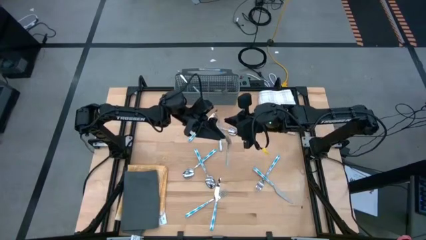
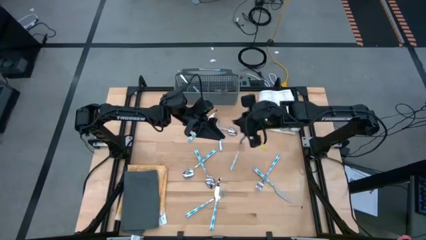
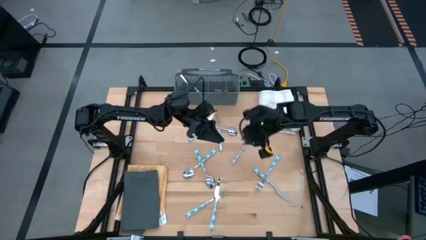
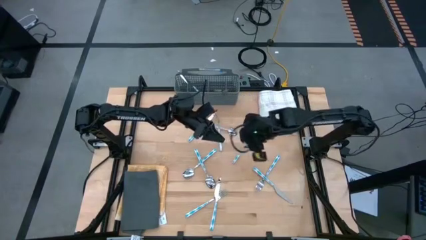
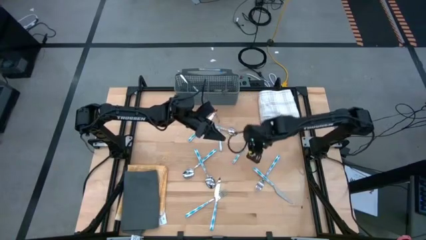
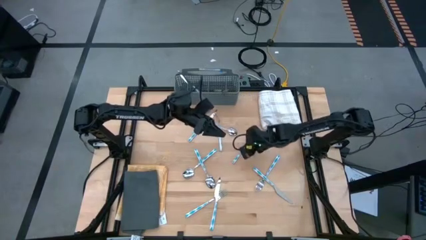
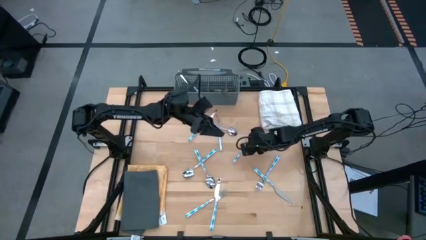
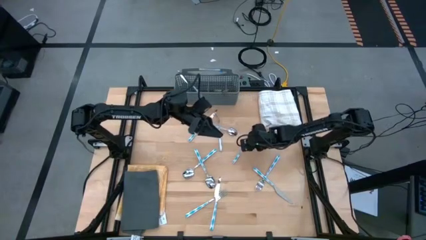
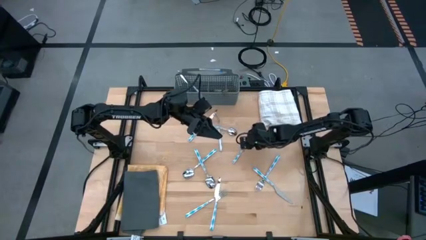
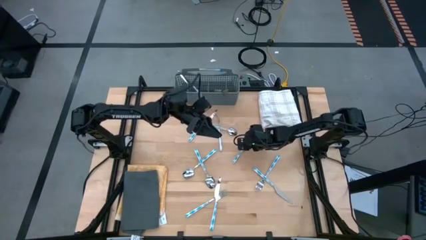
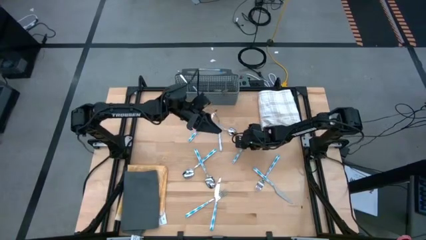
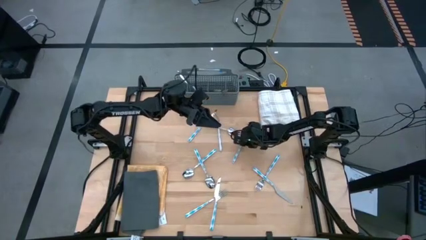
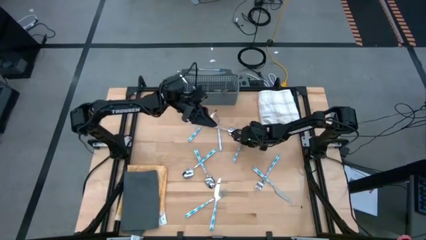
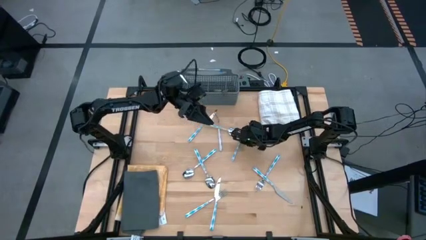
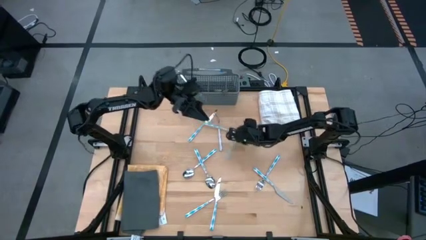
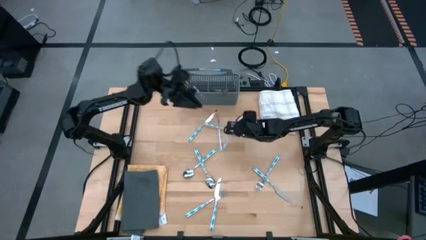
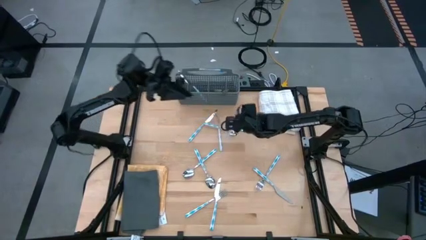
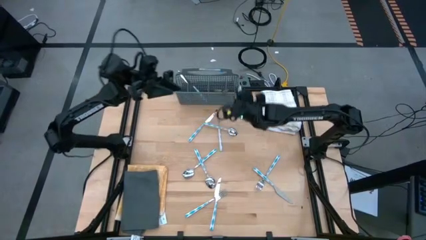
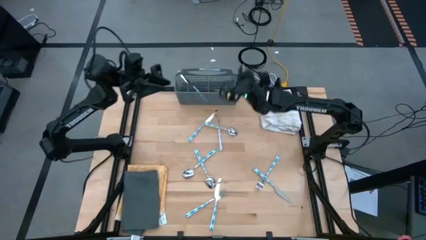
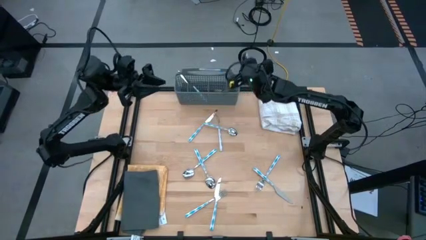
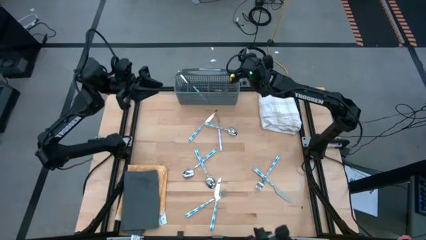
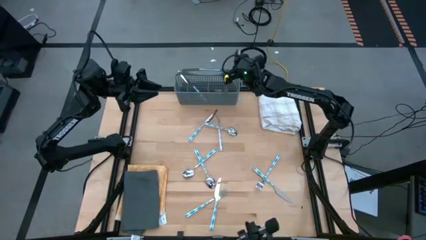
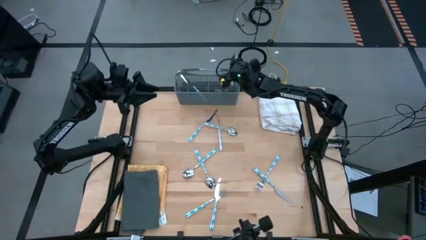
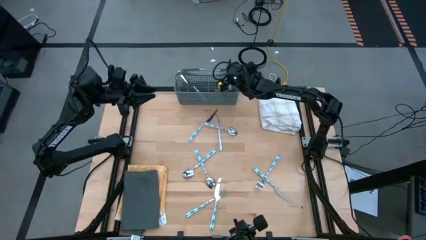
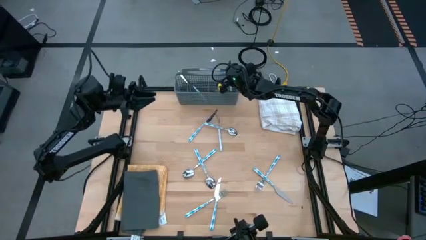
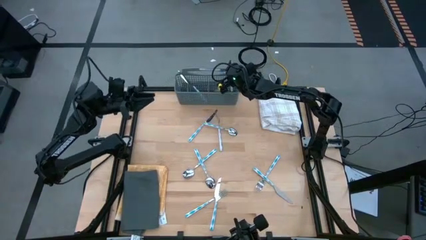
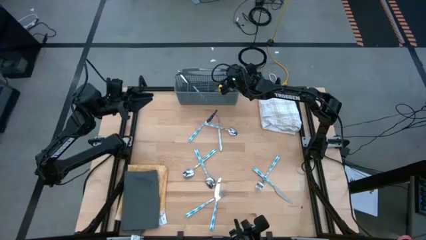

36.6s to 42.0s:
Task: Sort silverware
Put the blue spoon into the gray silverware rack

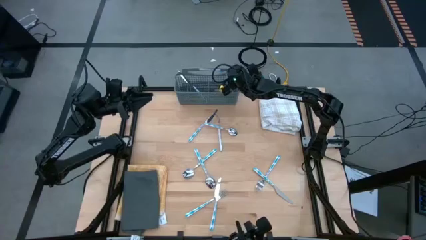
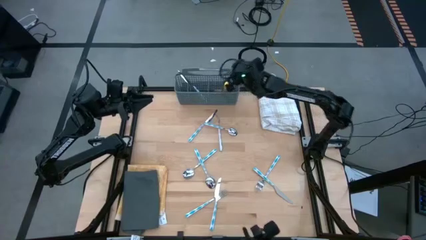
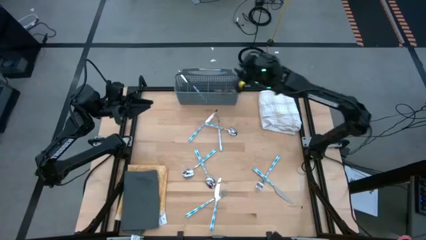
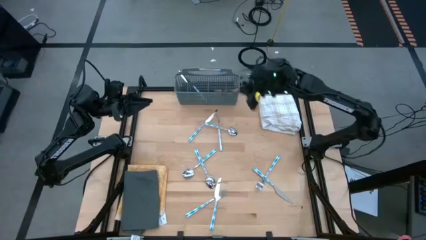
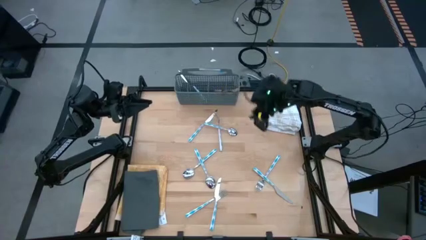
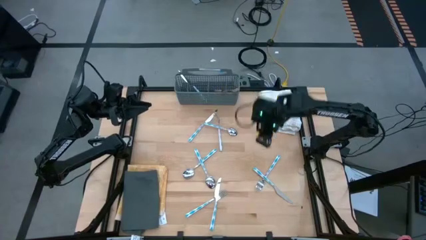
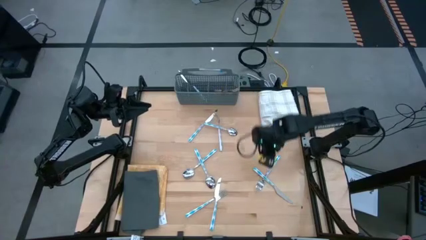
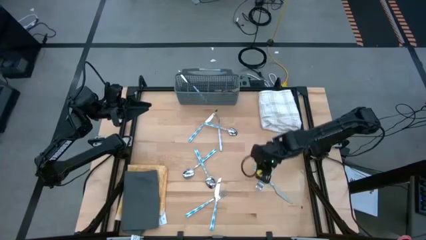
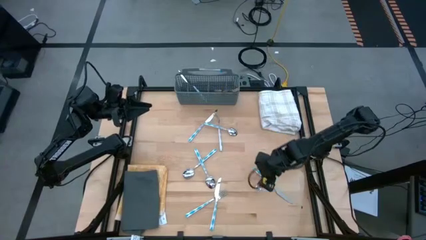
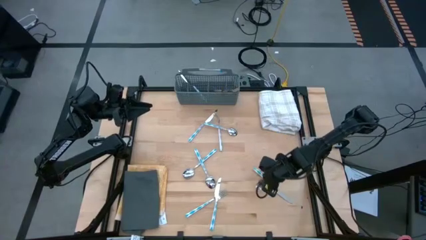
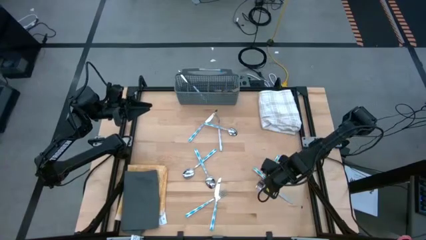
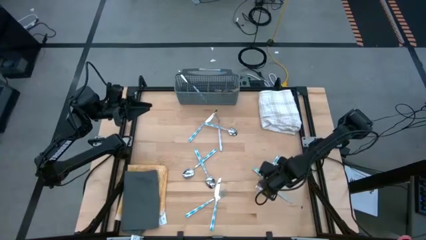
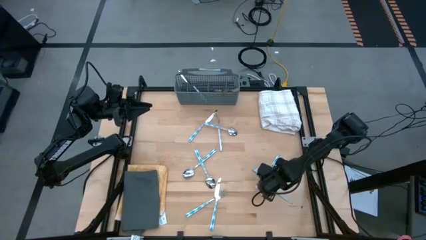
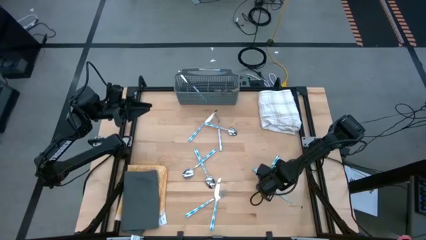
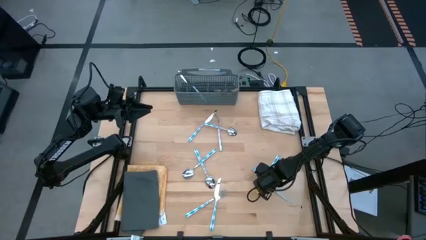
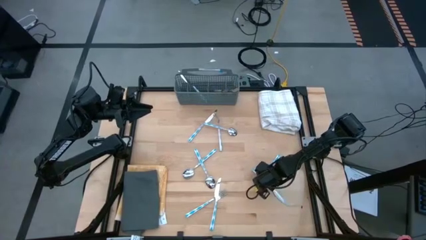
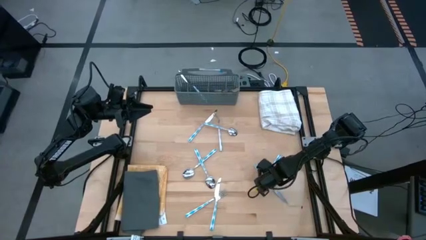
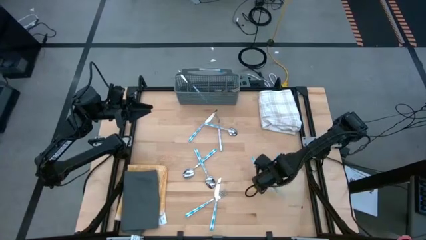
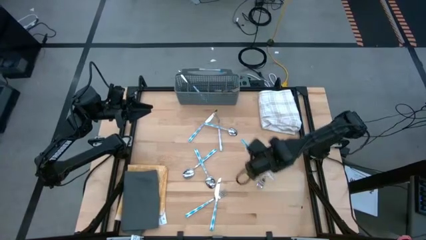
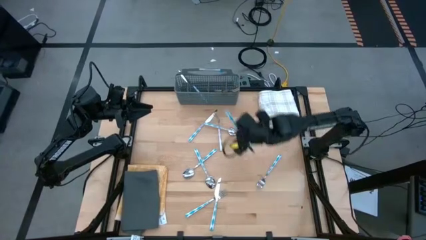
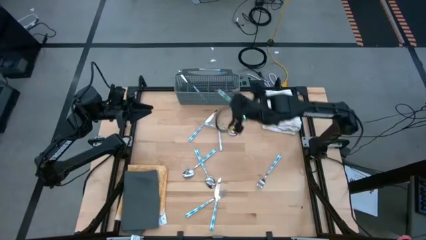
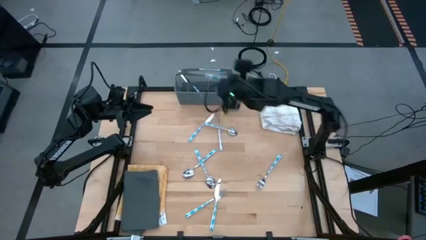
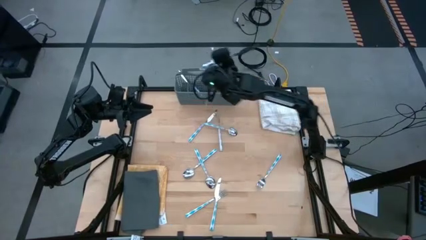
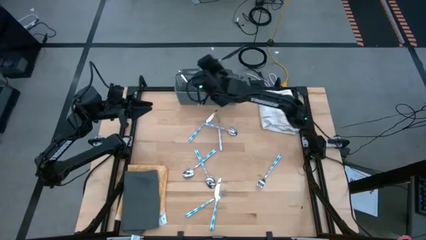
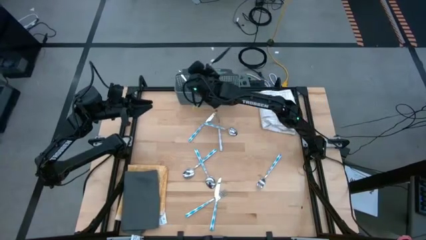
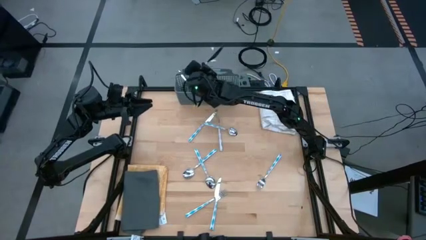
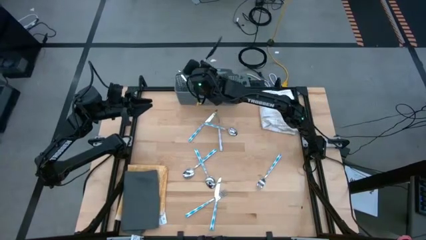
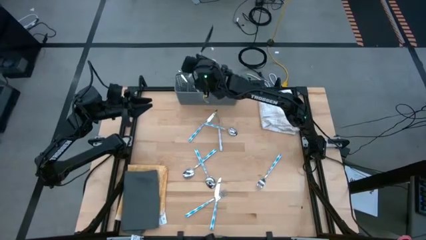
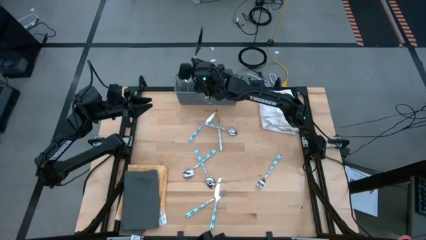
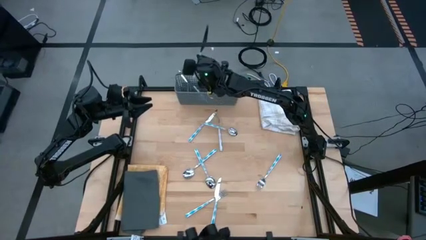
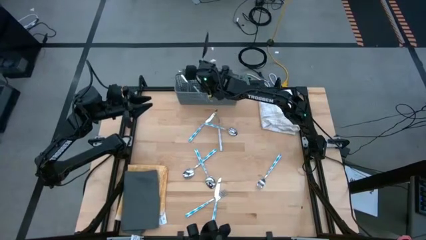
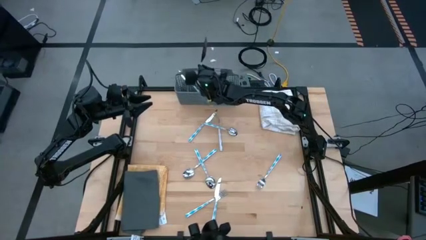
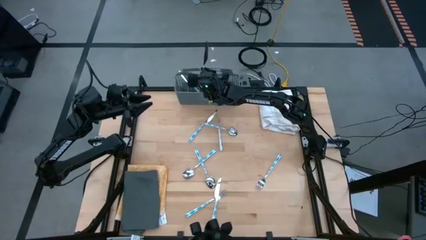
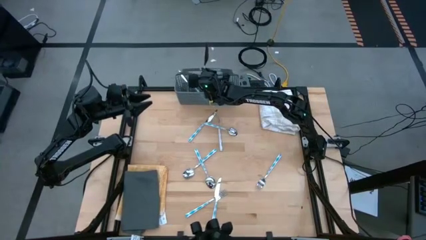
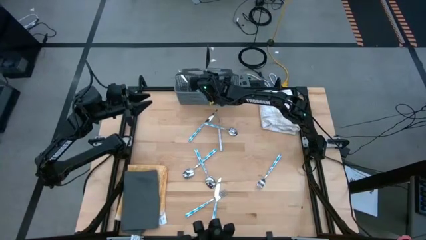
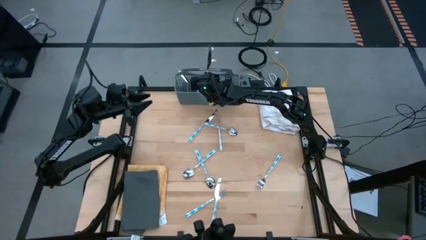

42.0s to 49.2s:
Put the blue table knife into the gray silverware rack
